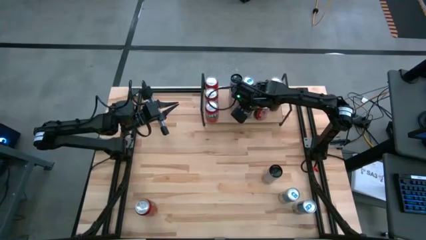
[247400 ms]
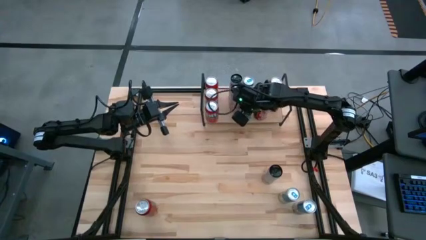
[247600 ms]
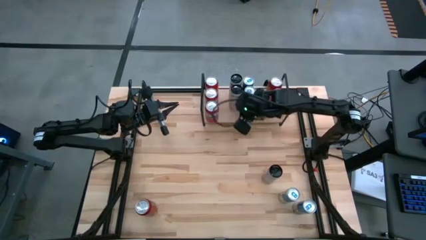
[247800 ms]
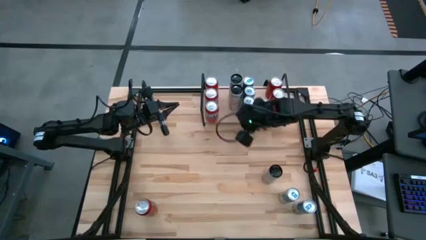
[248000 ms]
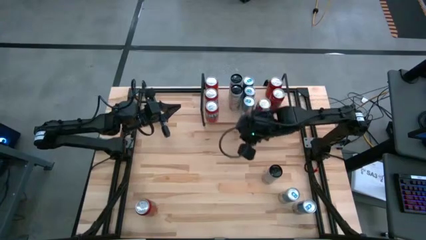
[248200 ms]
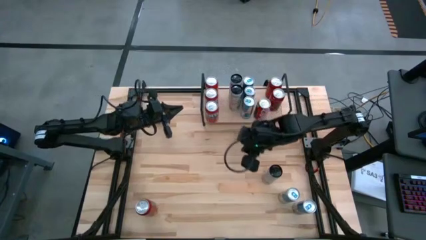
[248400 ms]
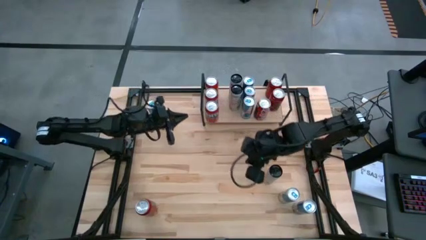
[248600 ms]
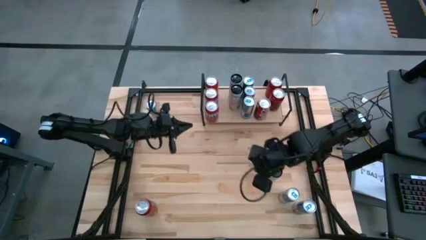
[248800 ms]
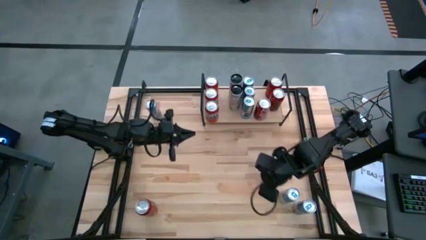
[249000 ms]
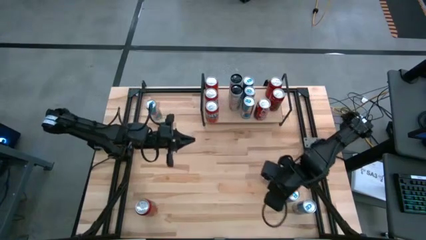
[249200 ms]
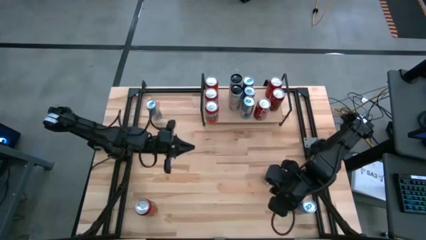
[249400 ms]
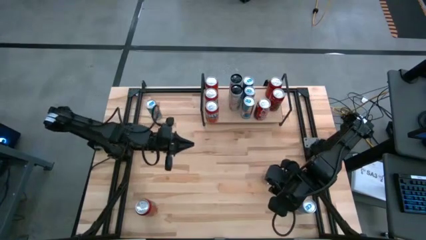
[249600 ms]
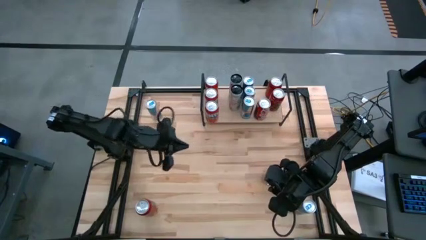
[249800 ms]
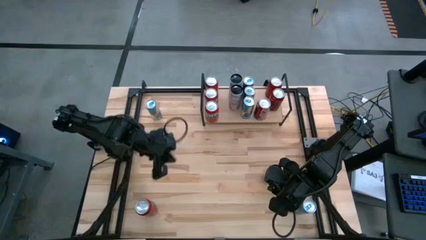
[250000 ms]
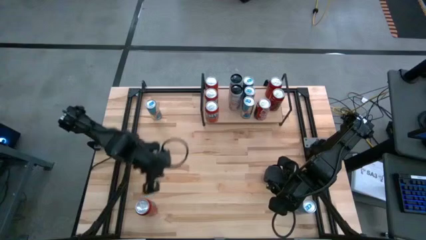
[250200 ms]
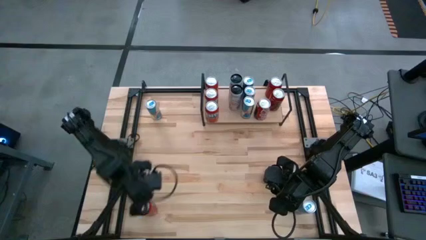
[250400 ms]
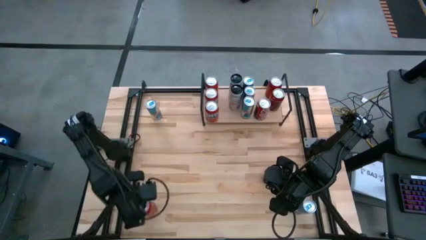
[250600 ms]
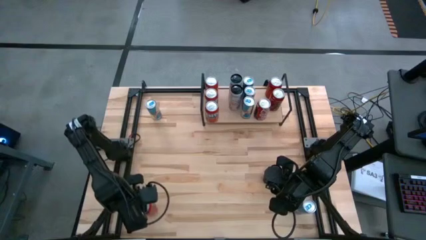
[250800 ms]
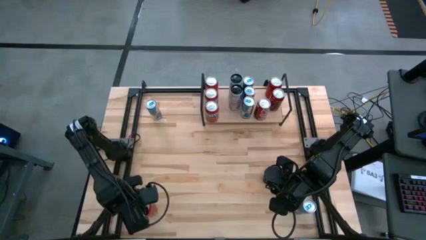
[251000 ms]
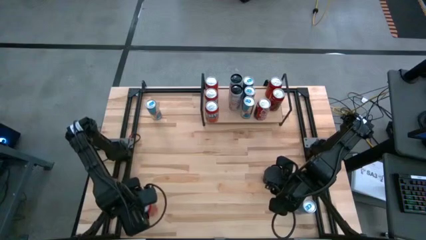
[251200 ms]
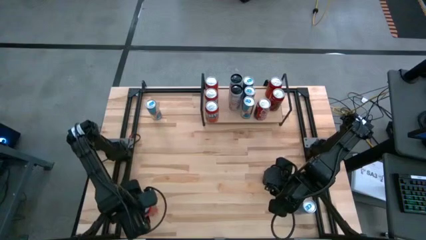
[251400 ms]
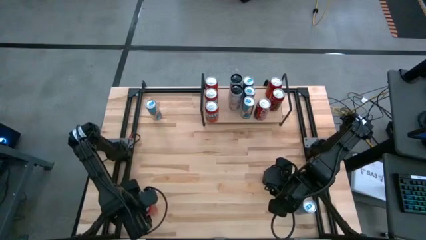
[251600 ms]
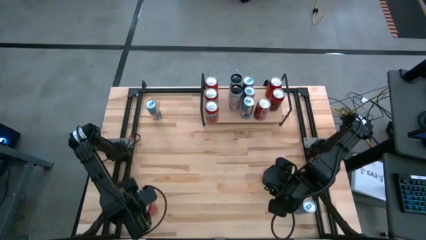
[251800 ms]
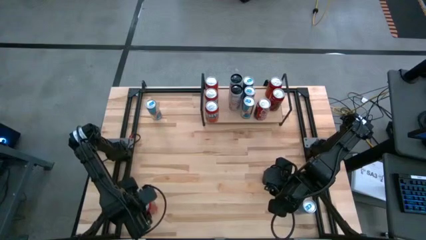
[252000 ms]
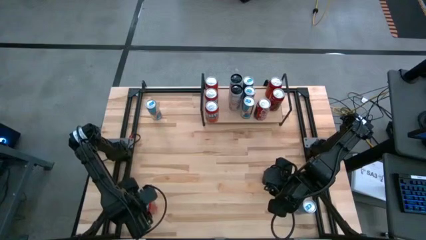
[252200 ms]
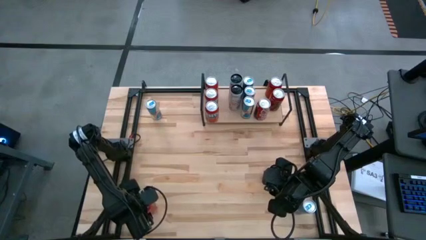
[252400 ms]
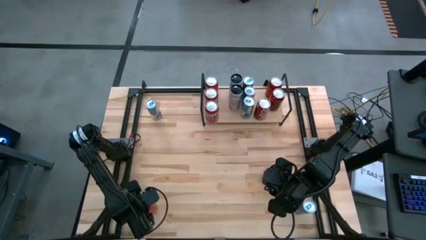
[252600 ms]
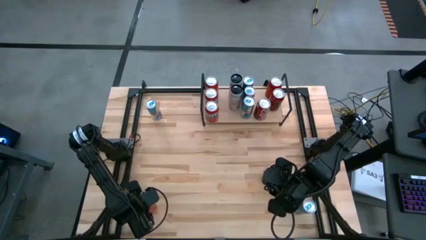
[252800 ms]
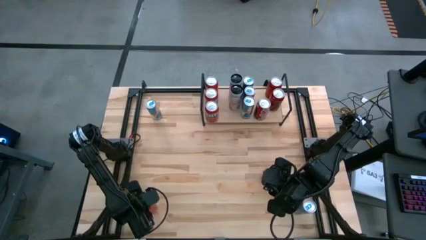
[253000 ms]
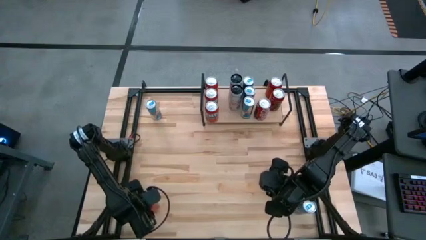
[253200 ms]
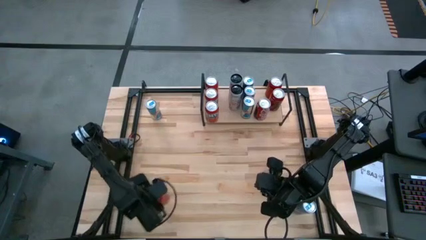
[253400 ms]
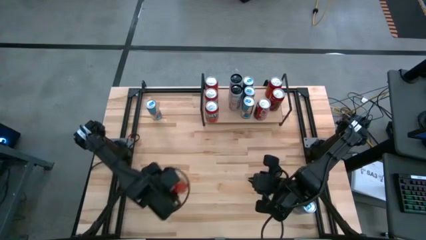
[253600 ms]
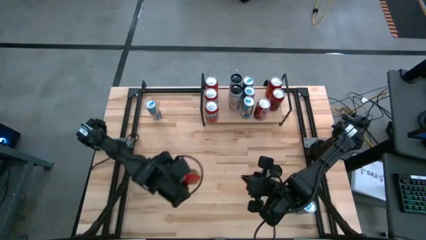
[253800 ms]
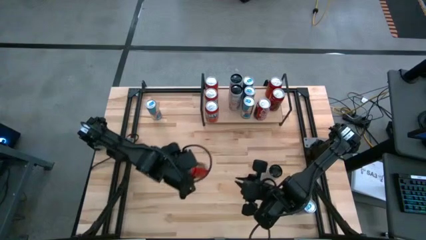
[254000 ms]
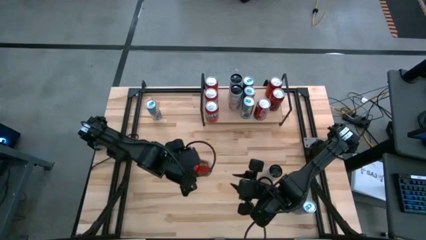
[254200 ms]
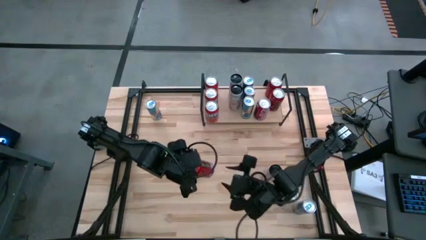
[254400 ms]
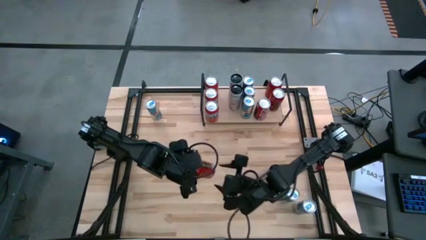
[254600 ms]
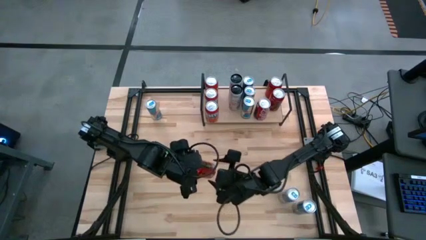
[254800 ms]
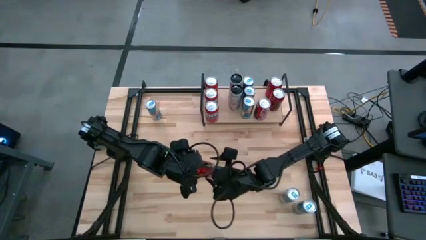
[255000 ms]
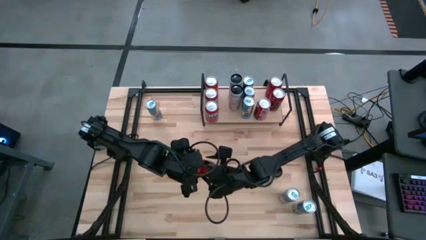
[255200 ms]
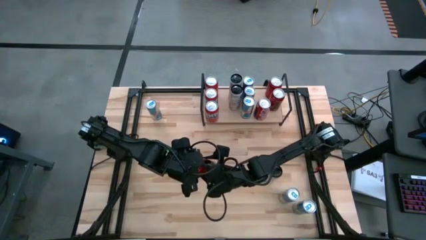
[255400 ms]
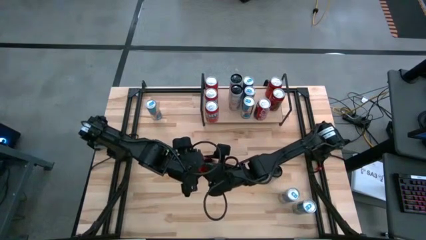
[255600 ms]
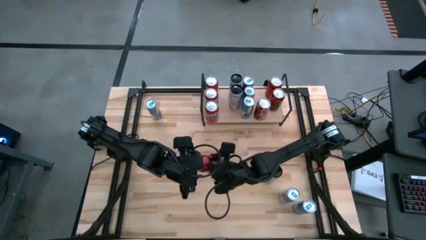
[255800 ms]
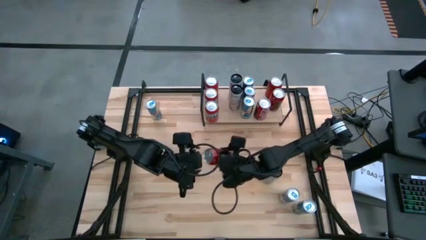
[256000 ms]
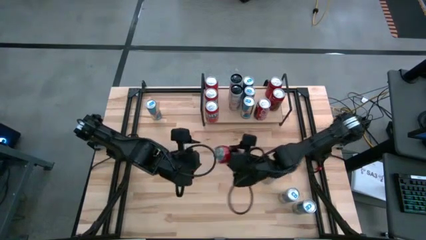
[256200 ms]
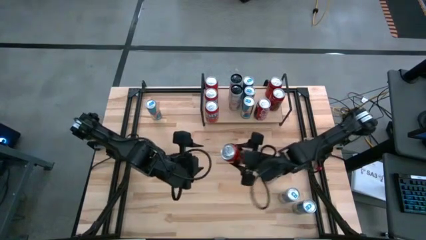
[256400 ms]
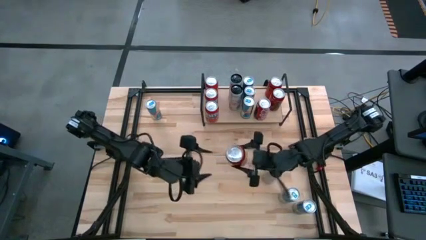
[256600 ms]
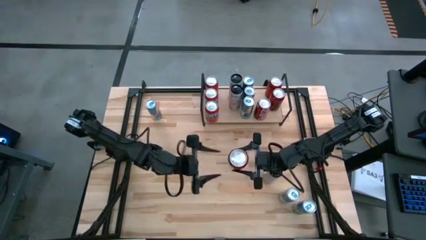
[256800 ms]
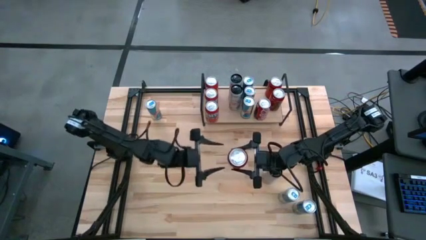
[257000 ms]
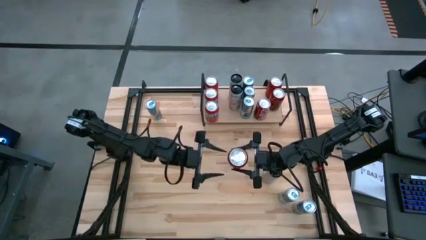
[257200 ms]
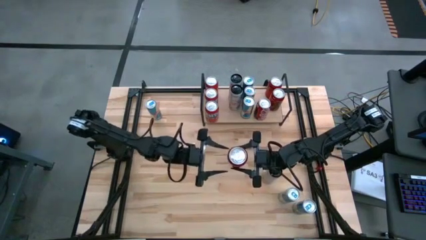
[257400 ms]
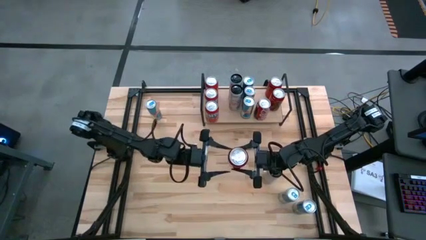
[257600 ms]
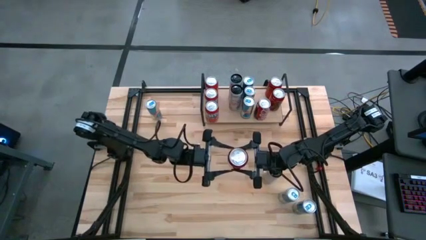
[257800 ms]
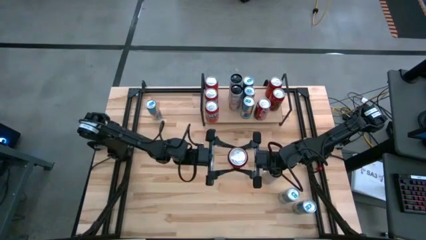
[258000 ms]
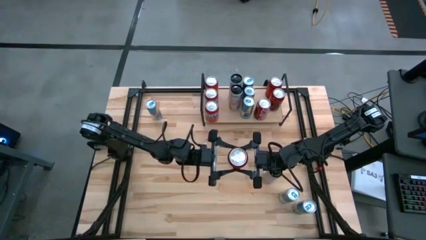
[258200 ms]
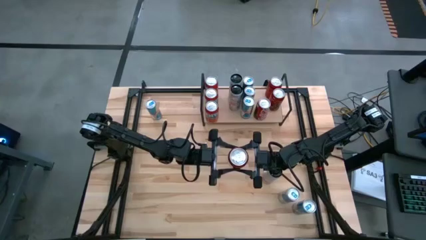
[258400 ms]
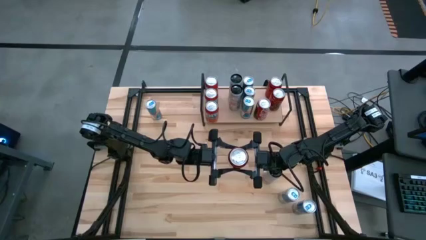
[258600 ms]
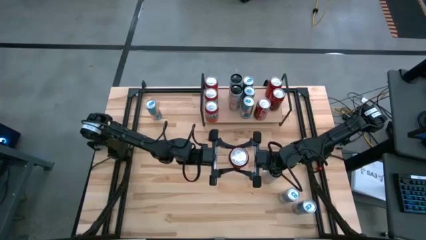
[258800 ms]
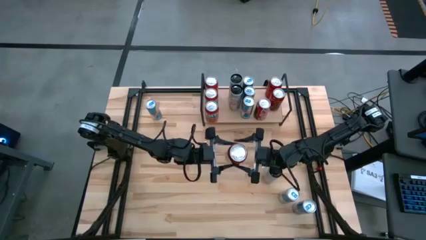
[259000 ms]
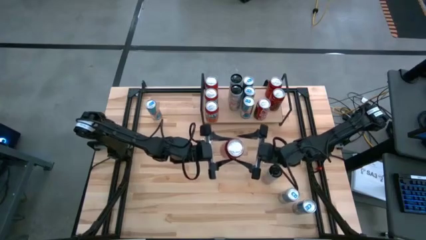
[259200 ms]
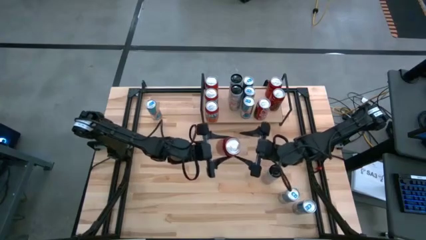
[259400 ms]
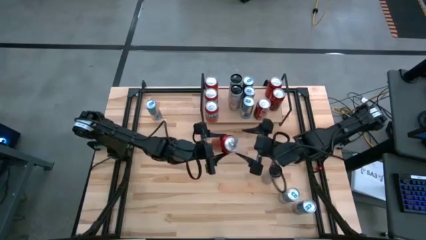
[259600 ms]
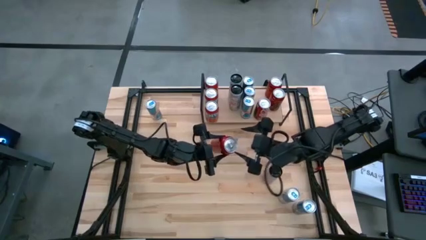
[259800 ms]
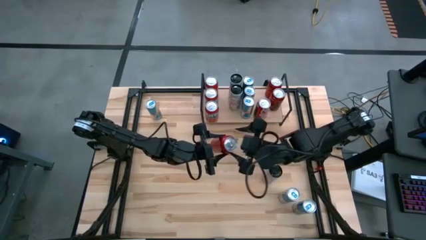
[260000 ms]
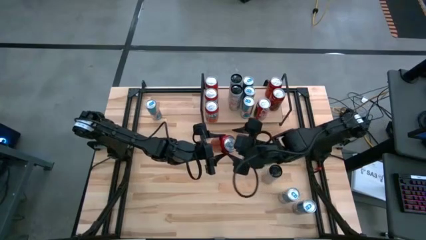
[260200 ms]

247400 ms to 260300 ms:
Task: Place canned beverage on shelf
Put the dark red soda can on the shelf

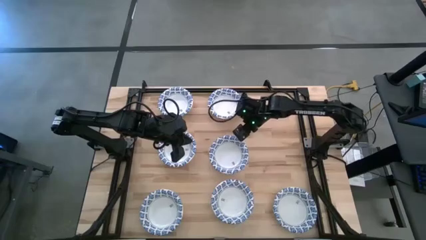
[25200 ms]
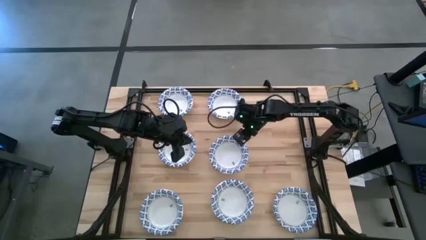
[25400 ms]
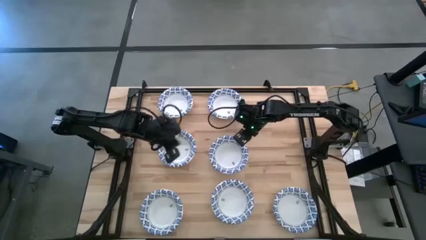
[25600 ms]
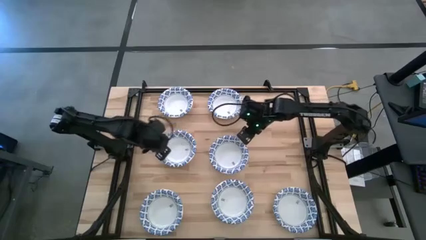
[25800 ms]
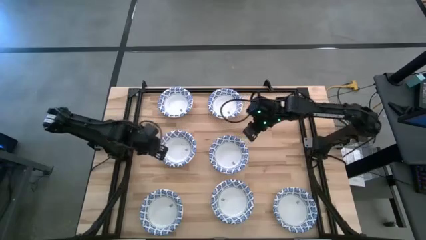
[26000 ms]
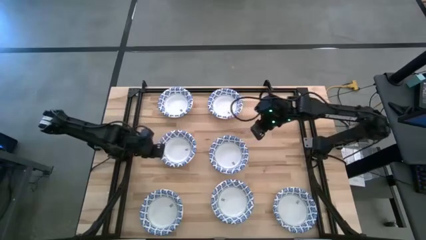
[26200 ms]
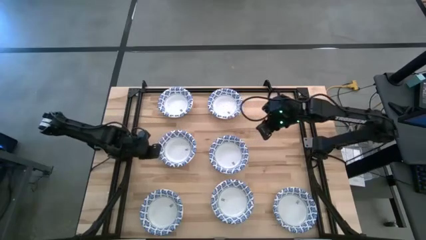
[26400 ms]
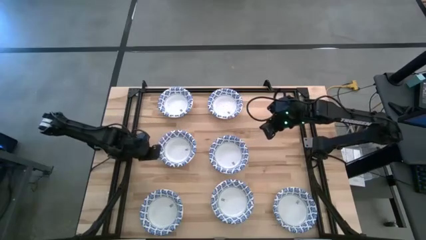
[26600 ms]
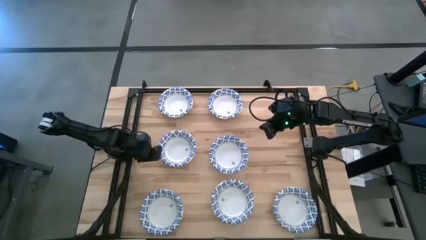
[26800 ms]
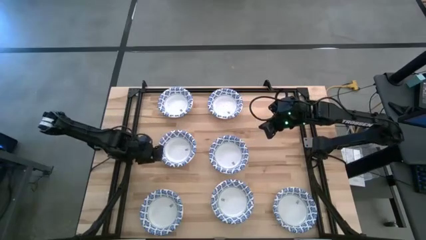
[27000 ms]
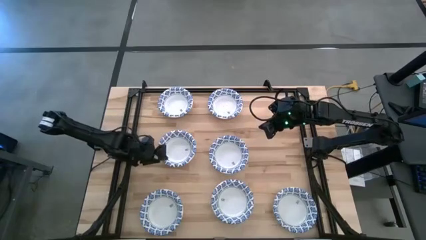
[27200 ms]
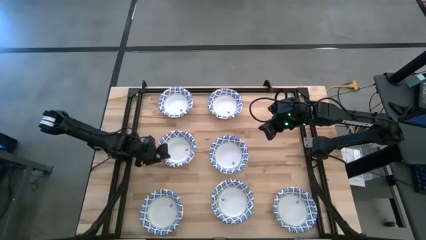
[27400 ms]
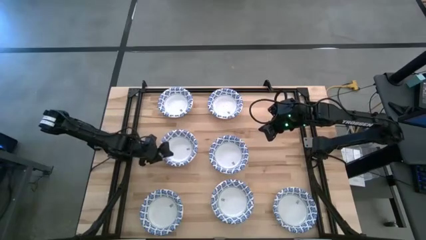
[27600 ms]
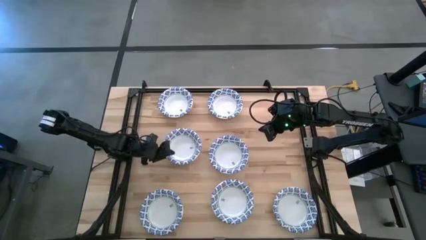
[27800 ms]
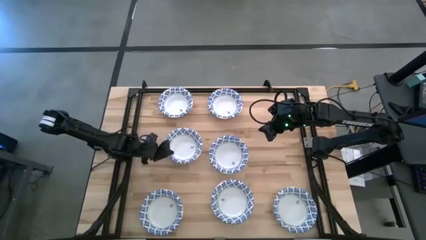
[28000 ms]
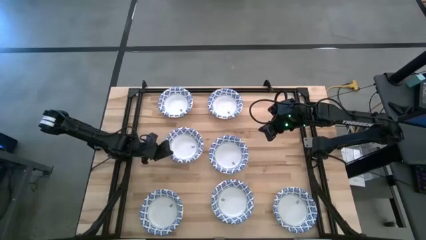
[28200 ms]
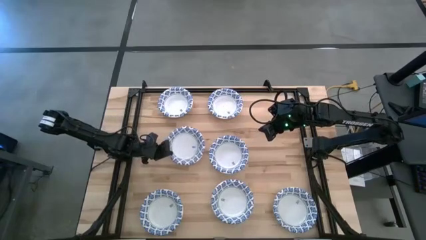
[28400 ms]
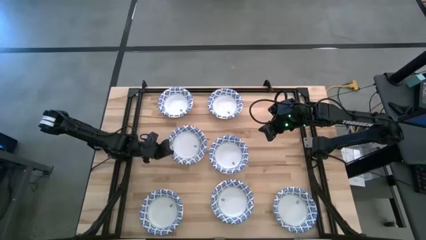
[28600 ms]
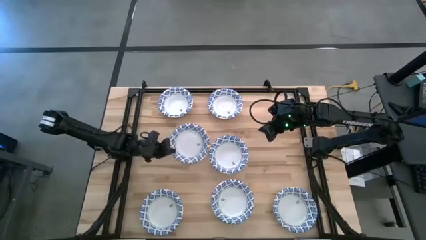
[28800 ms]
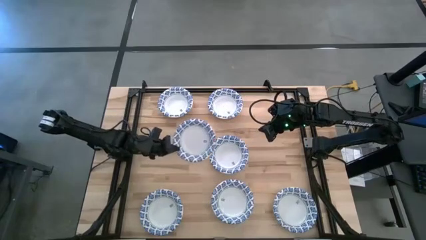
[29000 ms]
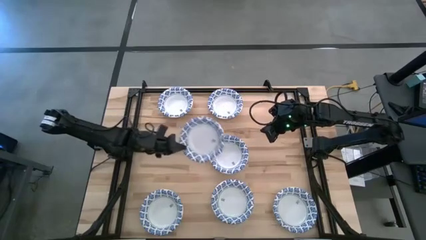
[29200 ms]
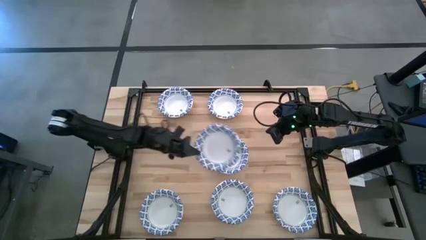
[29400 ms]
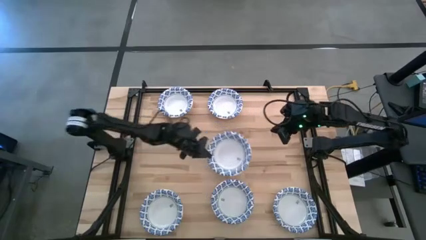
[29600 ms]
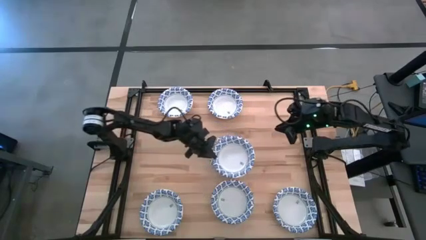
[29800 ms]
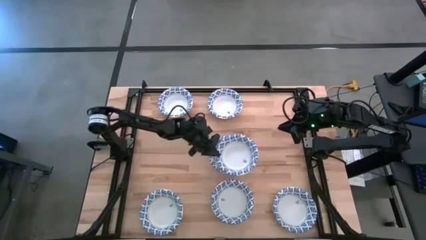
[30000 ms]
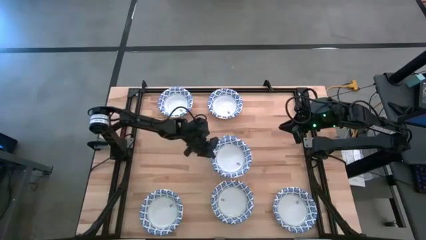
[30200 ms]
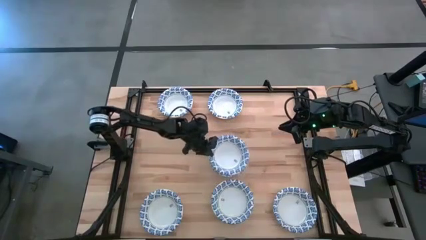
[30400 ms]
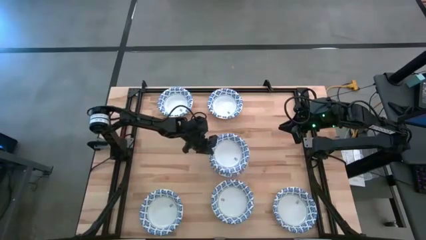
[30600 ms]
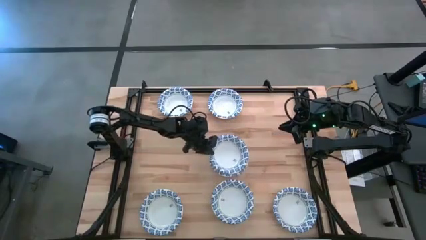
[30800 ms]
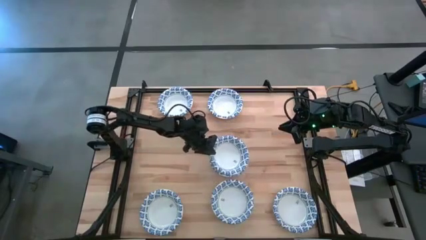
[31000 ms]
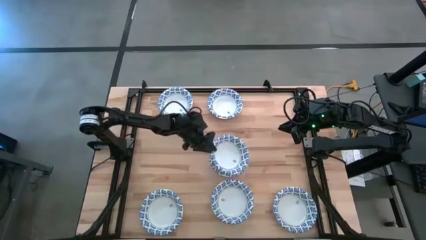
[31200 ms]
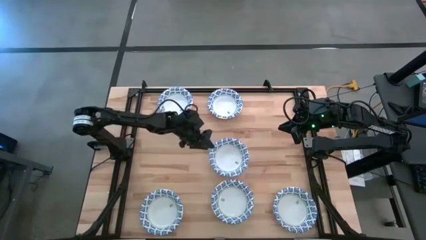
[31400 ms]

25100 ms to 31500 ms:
Task: Nest bowls inside each other
Stack the white patterned bowl on top of the center white patterned bowl
